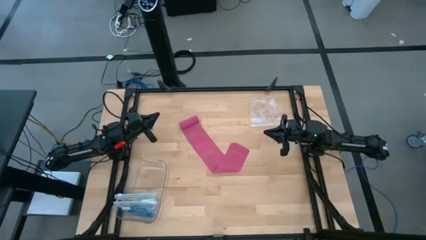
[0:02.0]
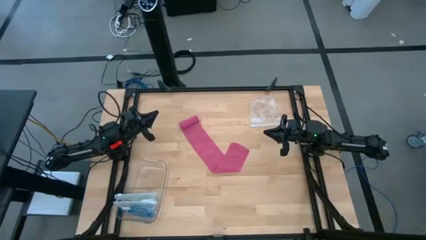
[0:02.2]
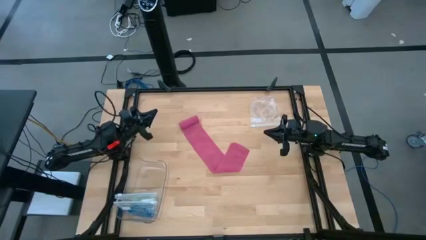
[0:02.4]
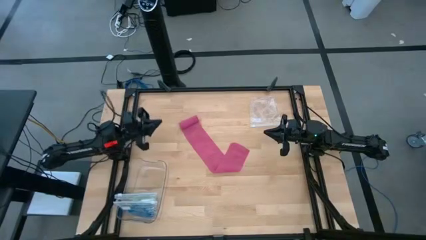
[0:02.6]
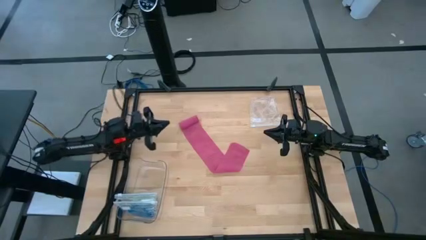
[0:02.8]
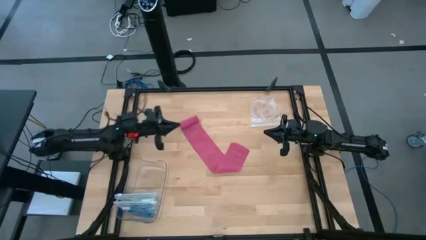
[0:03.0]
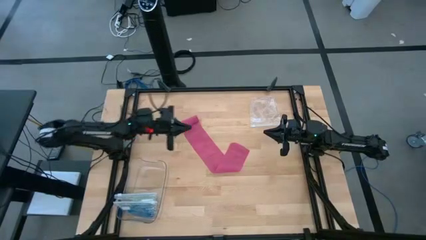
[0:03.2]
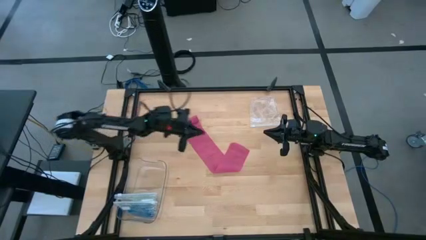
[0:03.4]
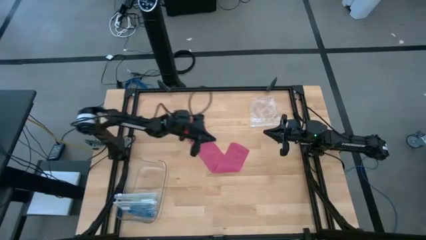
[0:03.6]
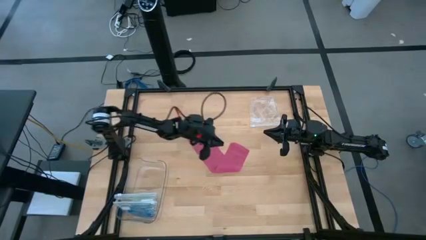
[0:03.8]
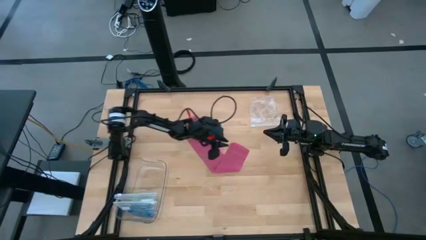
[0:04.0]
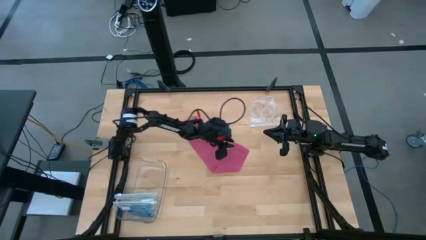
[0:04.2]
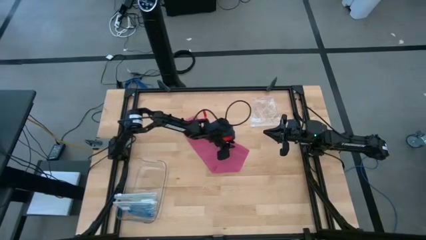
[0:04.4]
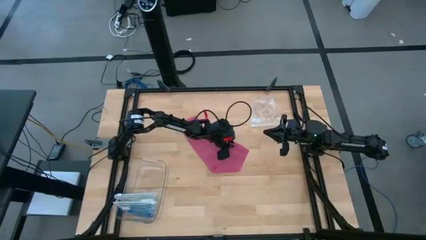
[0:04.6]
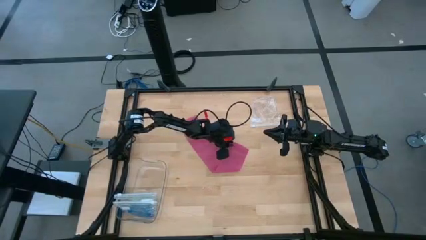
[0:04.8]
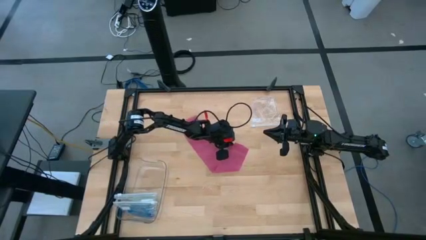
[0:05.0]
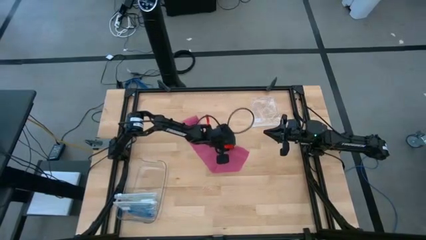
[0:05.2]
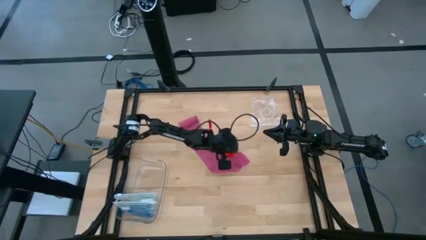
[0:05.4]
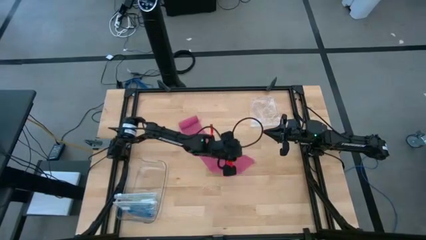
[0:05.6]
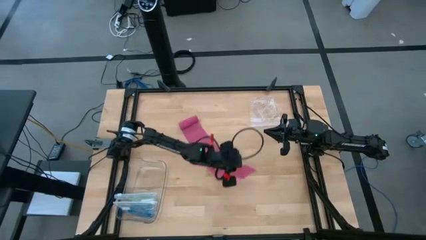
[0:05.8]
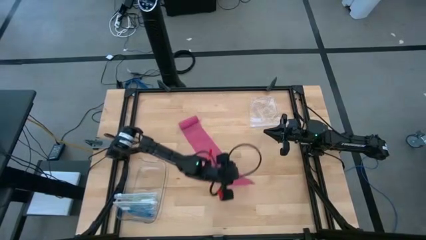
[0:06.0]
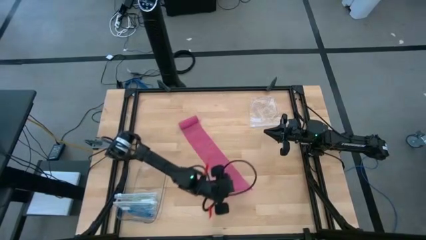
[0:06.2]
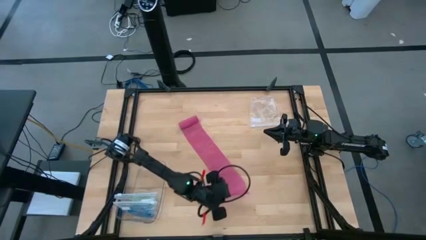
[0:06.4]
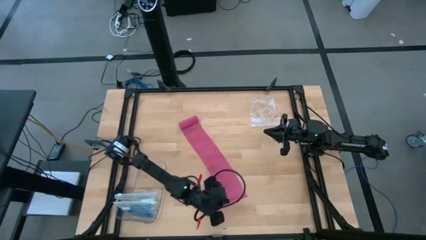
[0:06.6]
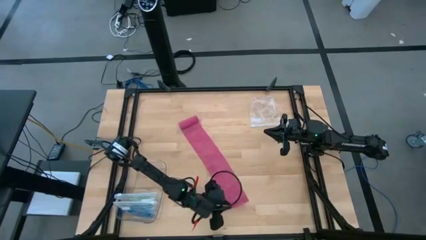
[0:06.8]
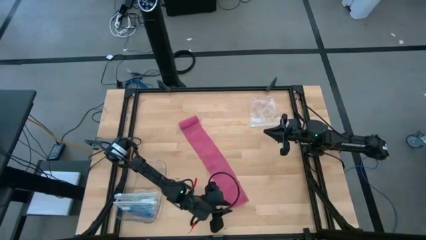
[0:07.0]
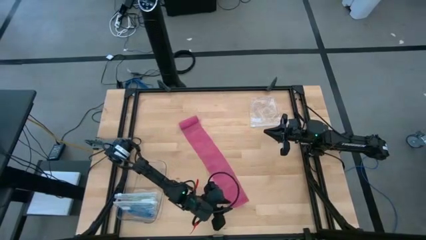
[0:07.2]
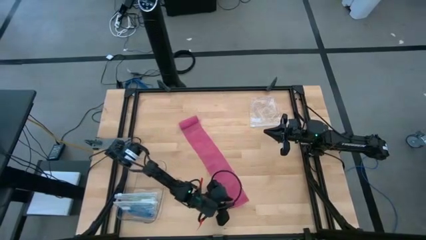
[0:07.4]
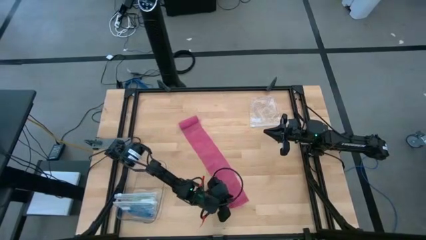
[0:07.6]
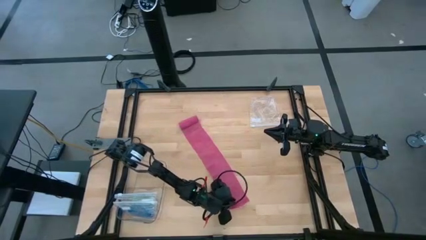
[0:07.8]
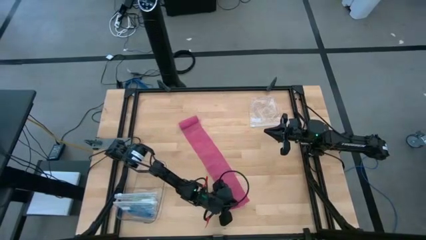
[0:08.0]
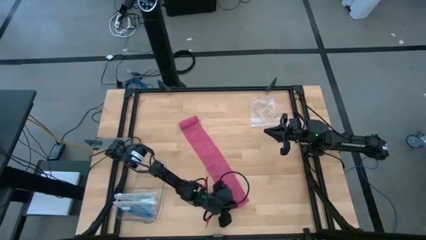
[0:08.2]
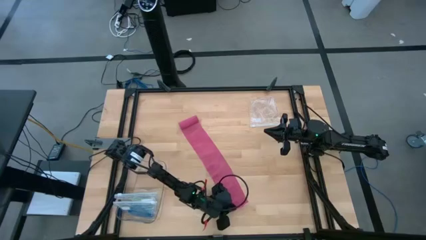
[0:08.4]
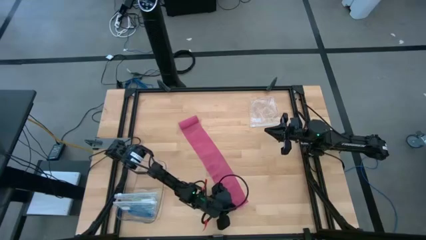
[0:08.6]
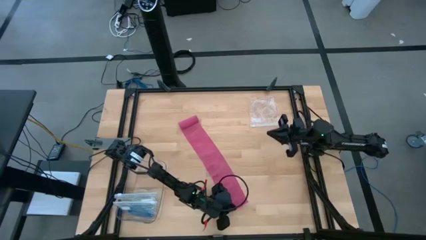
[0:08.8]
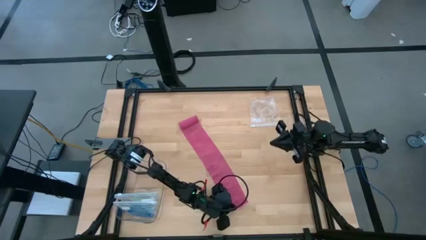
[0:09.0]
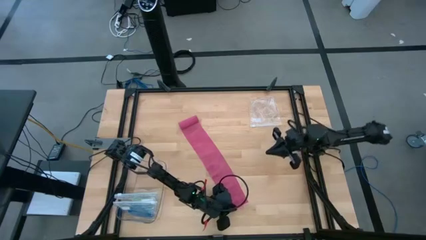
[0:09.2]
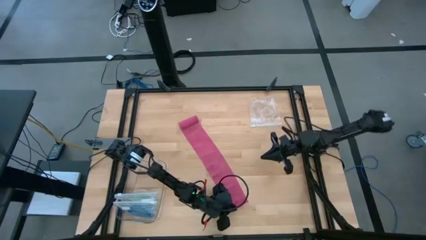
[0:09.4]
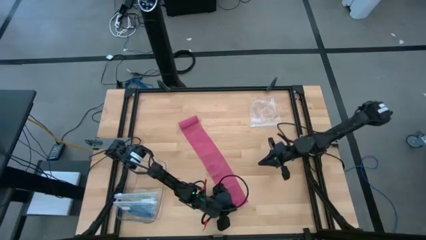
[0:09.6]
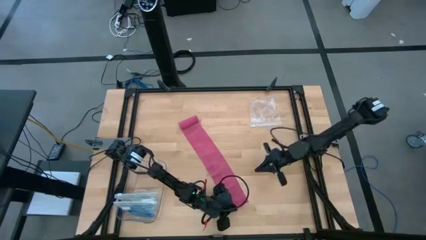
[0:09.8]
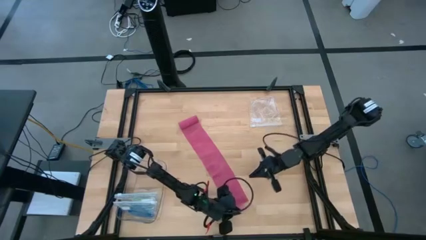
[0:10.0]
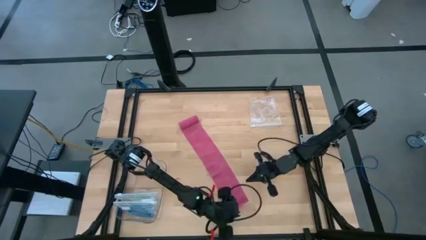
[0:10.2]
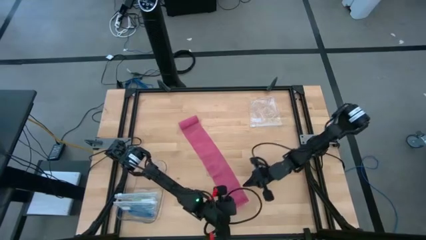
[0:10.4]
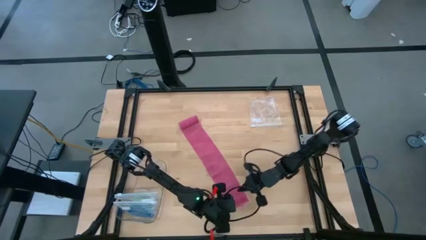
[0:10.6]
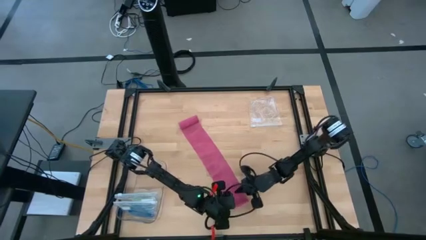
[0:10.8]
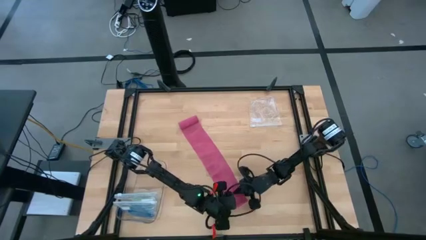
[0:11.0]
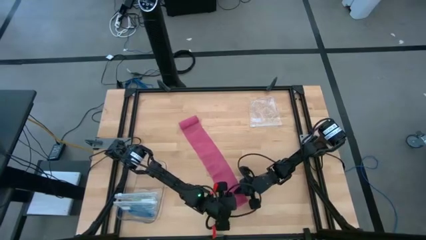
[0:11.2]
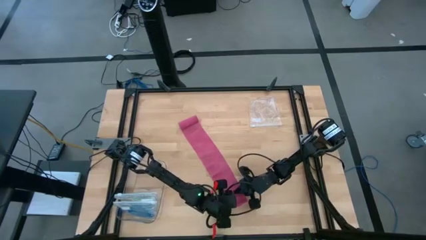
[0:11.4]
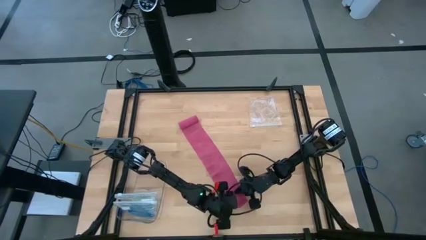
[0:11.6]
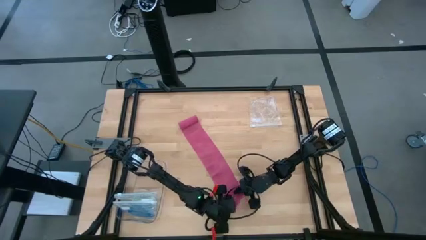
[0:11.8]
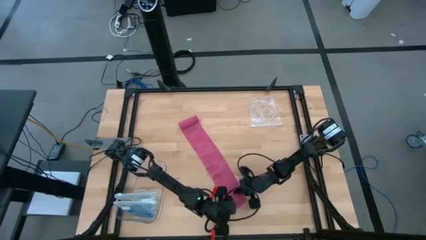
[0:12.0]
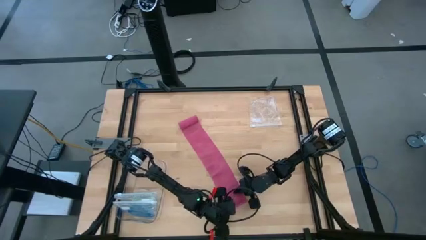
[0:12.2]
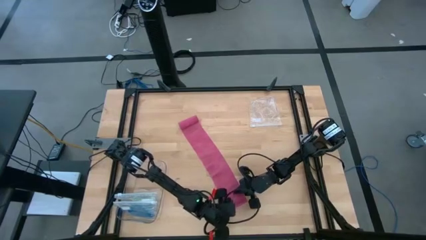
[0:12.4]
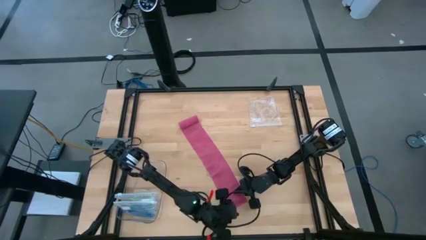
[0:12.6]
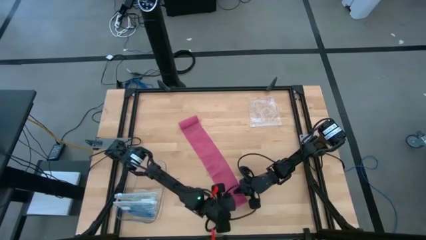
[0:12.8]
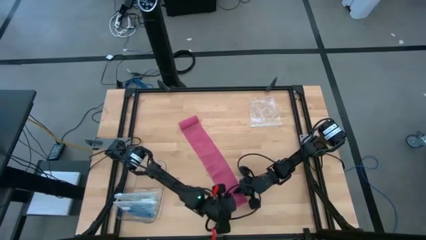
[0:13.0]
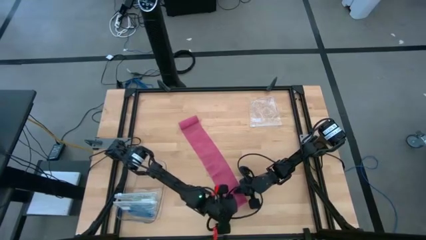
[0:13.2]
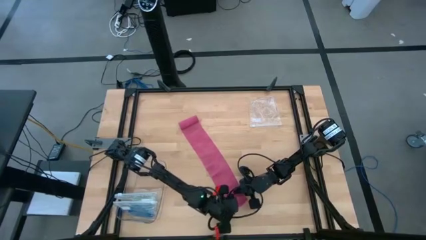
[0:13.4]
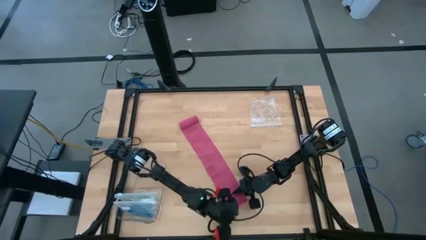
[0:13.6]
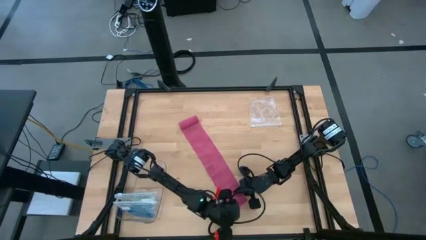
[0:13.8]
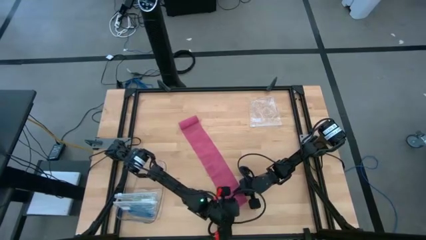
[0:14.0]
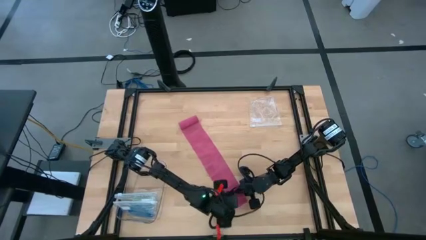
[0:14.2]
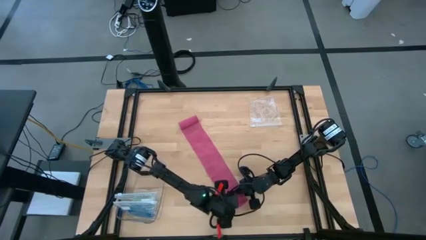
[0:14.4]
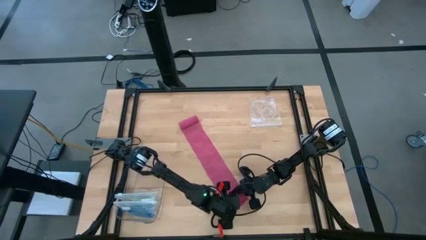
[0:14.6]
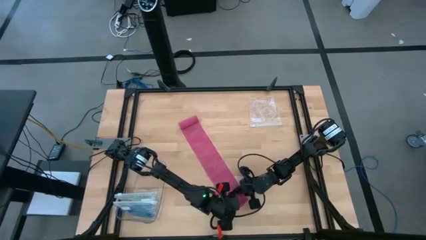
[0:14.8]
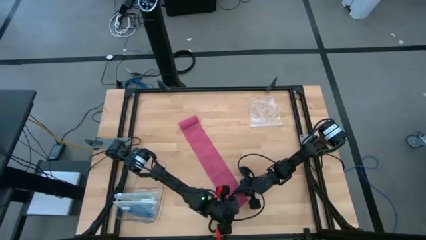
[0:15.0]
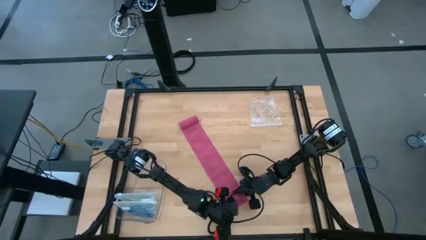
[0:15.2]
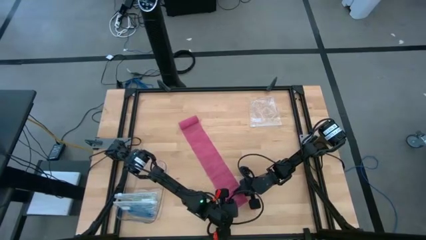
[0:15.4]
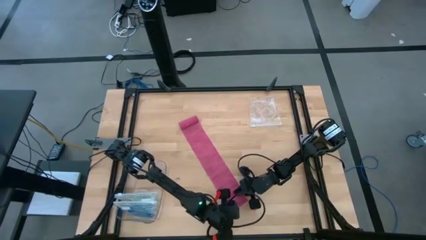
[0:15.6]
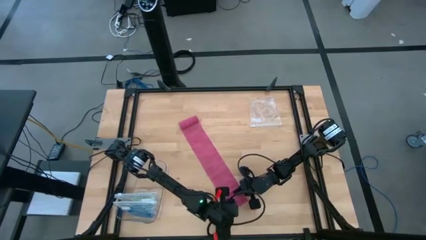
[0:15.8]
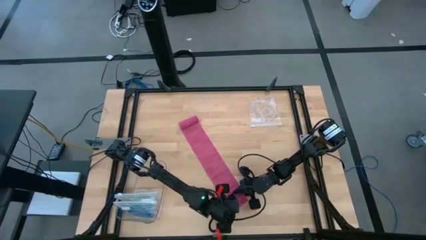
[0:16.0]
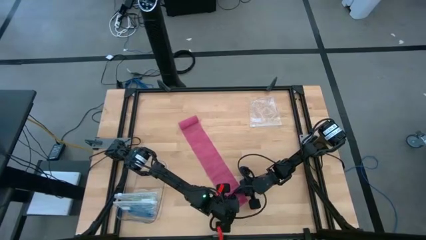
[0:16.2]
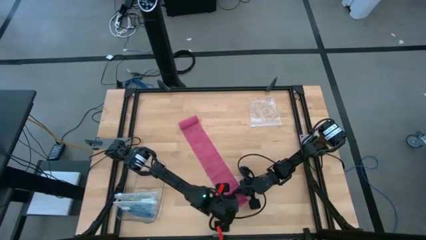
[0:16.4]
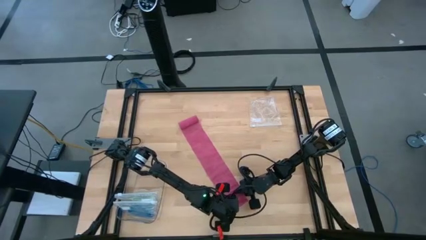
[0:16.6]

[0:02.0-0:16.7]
Task: Roll bandage
Roll the pink bandage
